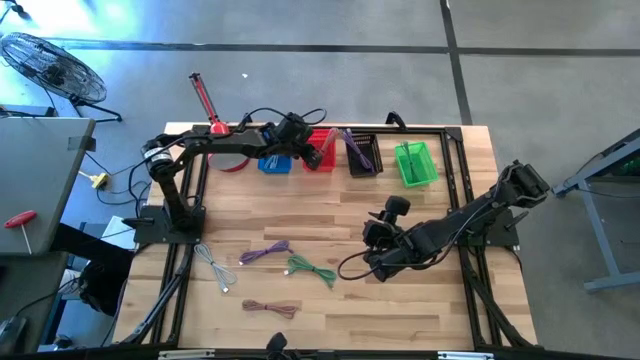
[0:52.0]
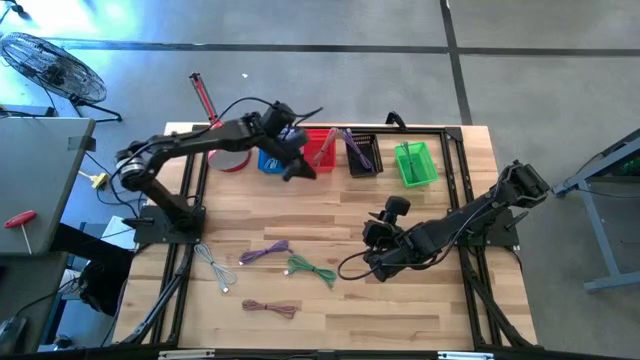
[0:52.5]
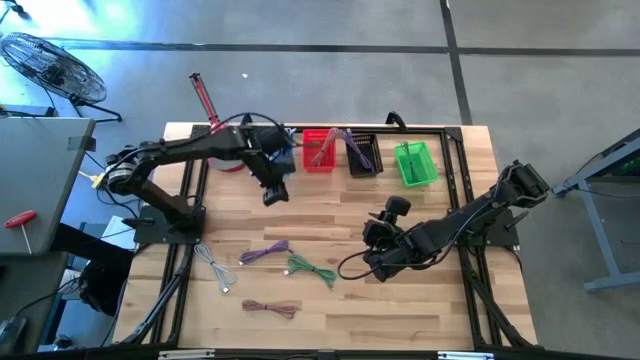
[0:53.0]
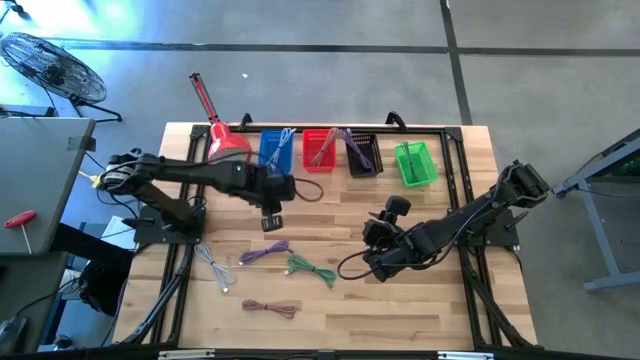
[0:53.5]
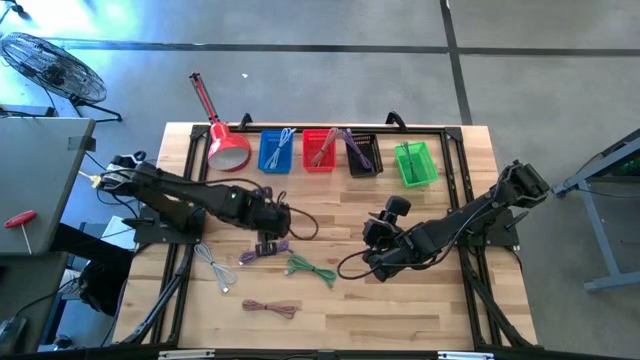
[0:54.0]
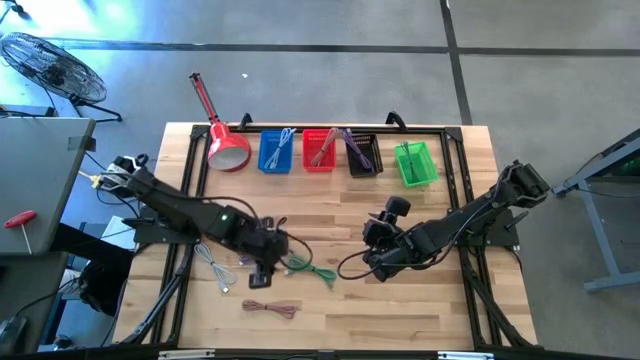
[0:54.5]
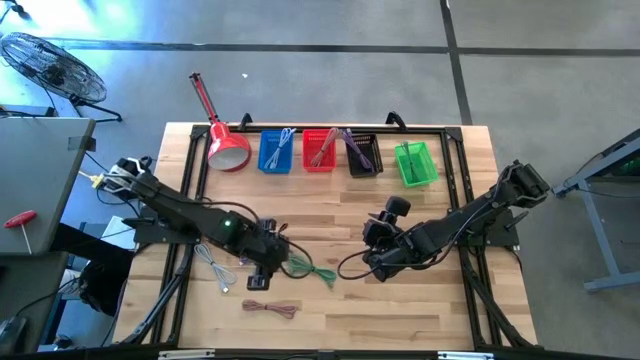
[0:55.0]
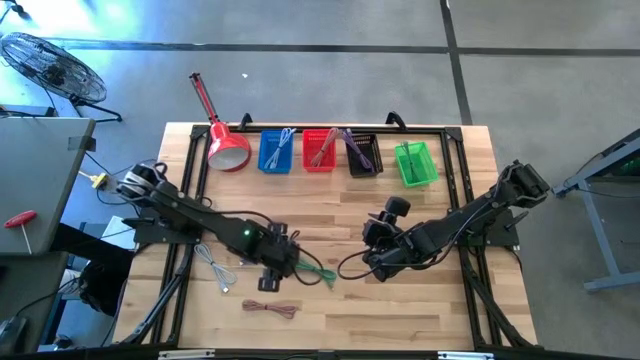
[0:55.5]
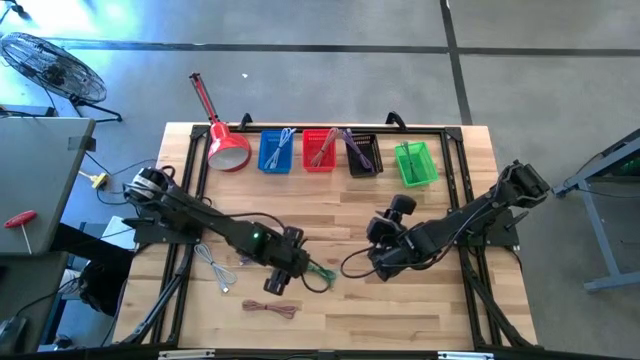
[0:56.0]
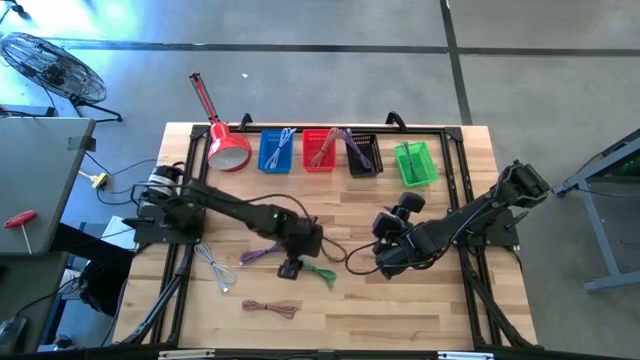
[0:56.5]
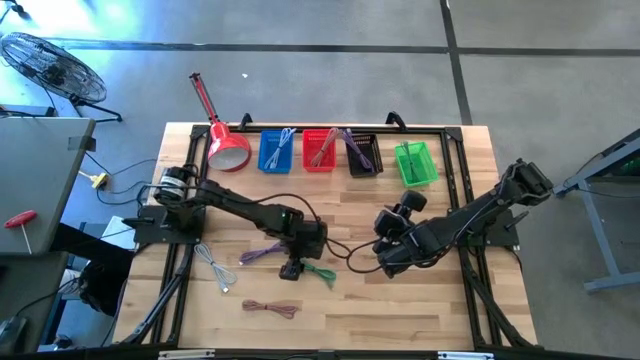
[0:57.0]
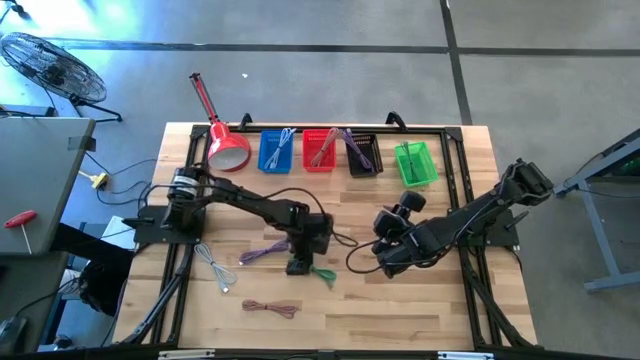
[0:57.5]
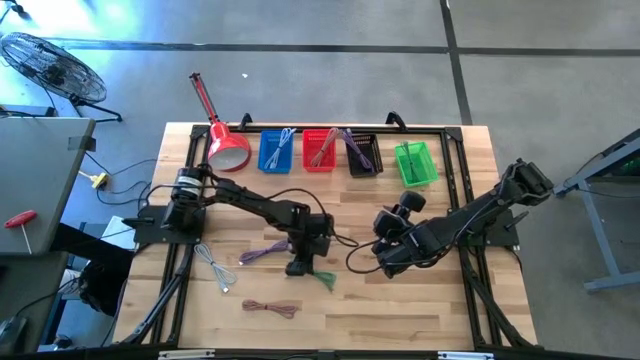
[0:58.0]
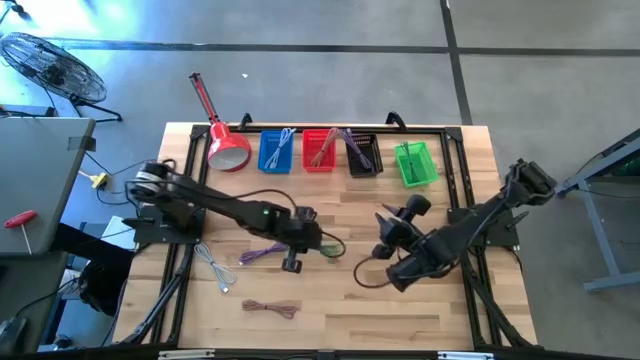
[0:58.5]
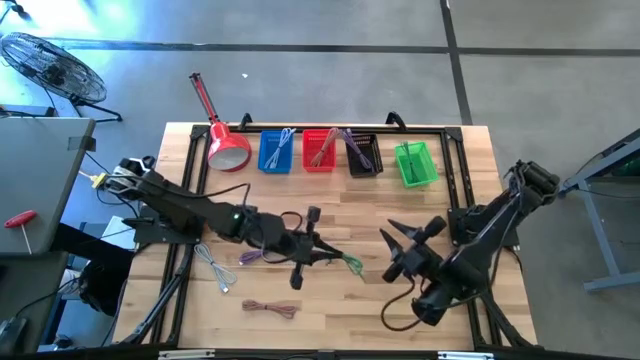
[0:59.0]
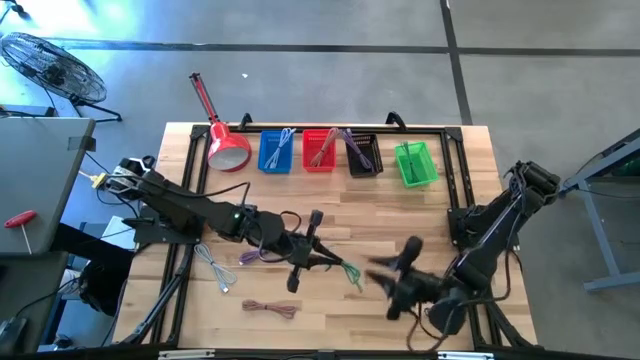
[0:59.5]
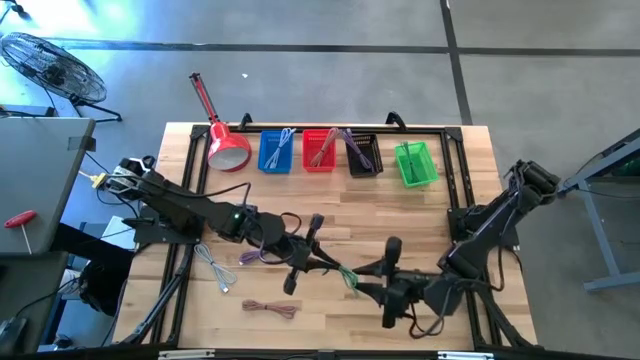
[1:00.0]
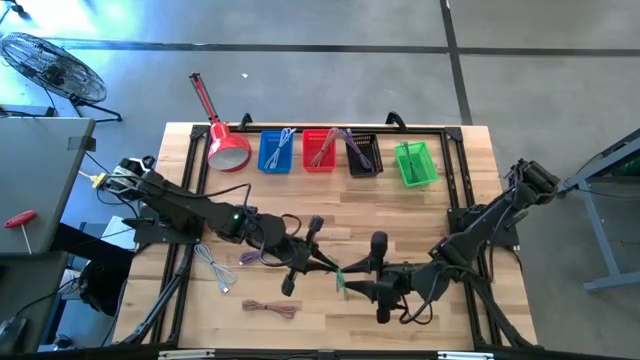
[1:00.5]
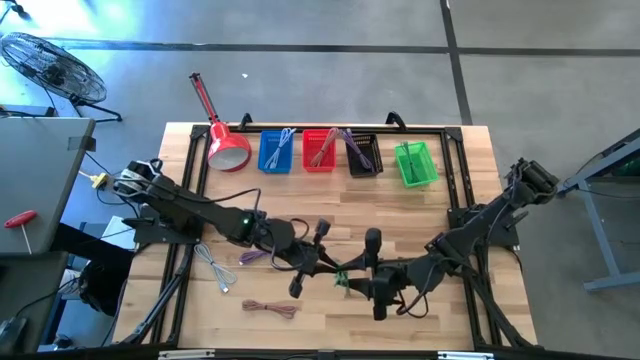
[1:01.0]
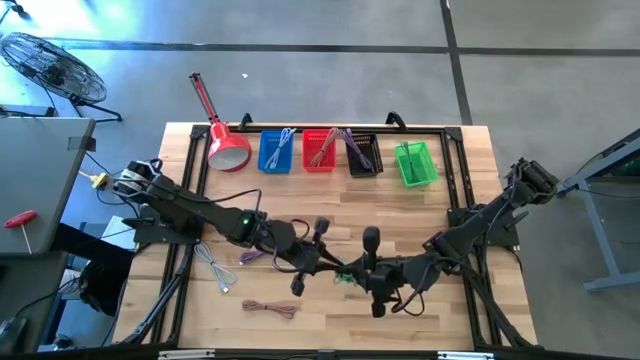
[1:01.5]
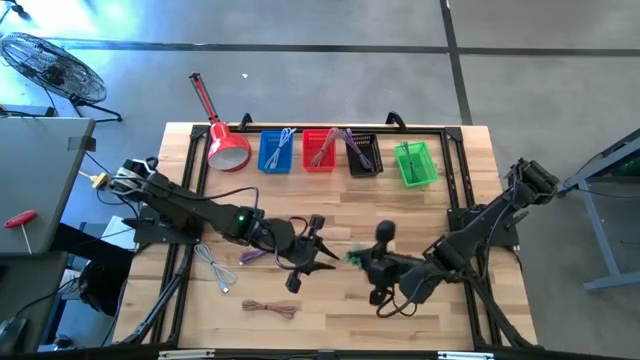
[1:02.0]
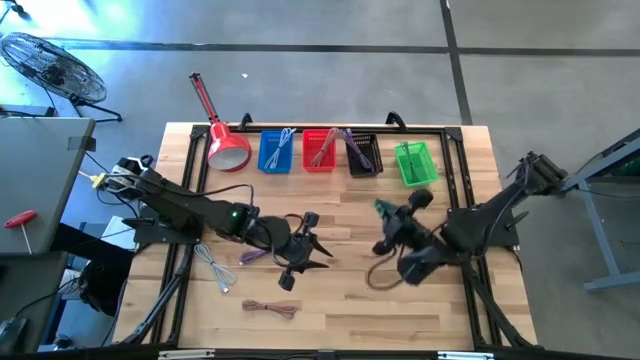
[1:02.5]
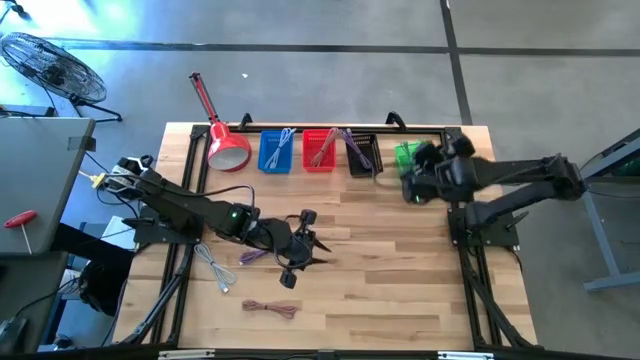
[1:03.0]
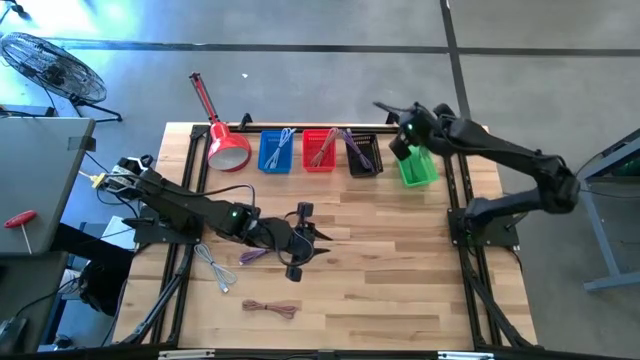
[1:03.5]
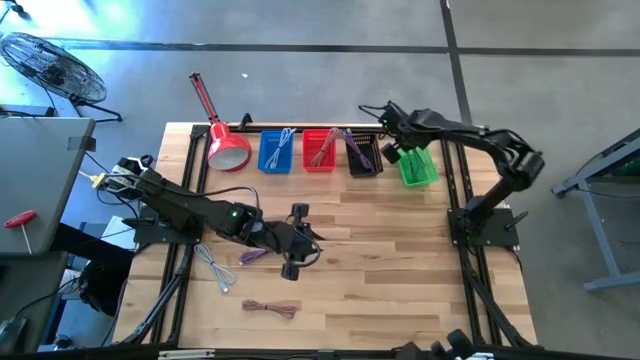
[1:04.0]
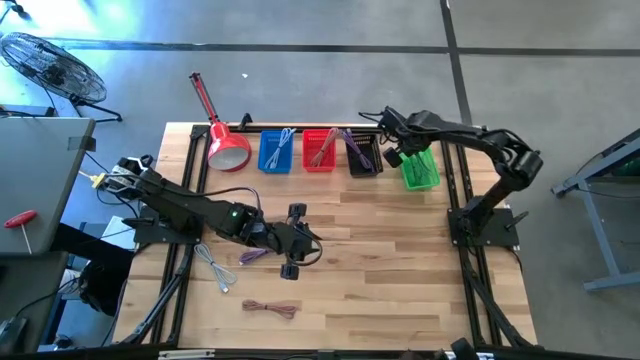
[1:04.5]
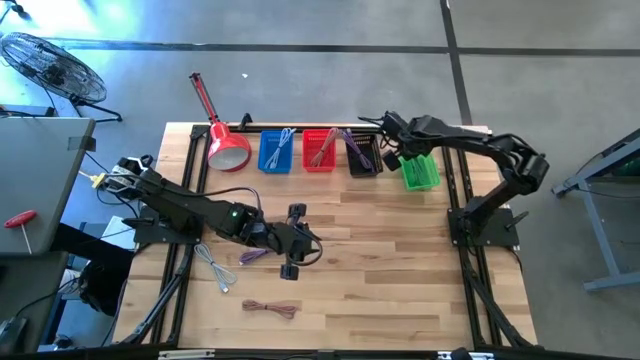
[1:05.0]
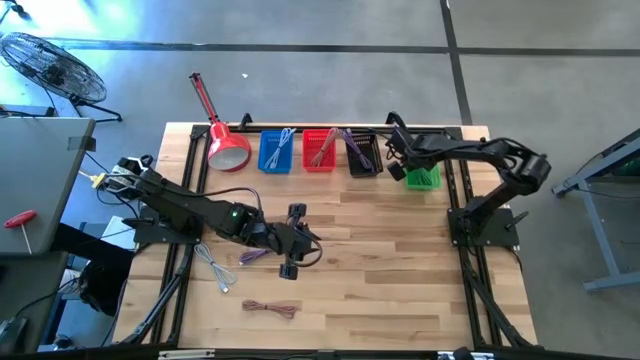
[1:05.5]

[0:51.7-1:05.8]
Task: Pick & Place USB Port
Put the green charger cable into the green bin
